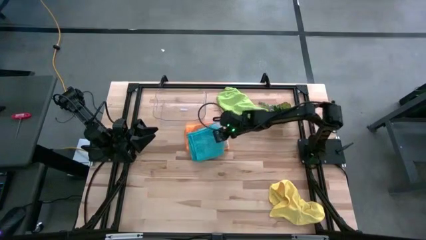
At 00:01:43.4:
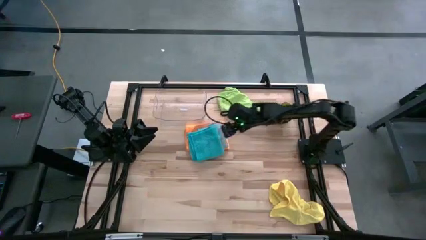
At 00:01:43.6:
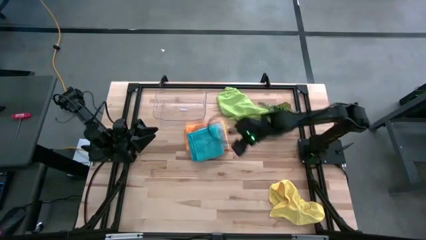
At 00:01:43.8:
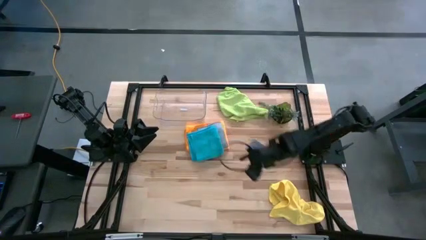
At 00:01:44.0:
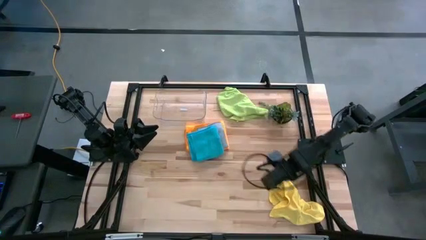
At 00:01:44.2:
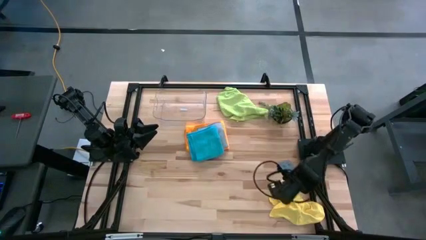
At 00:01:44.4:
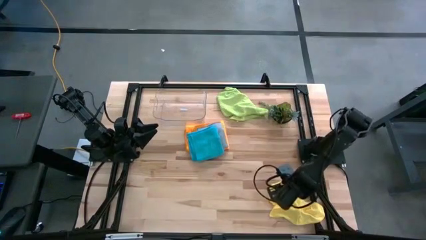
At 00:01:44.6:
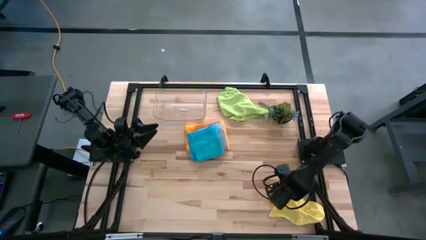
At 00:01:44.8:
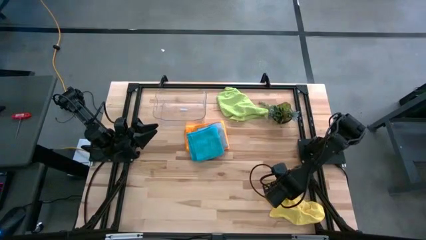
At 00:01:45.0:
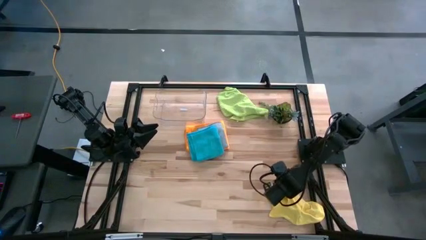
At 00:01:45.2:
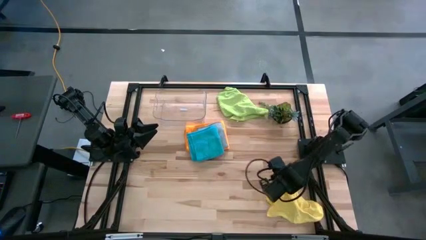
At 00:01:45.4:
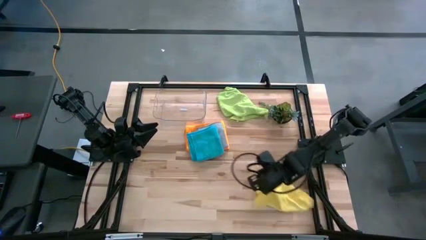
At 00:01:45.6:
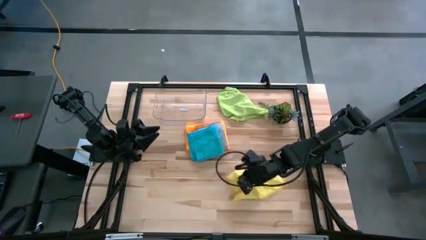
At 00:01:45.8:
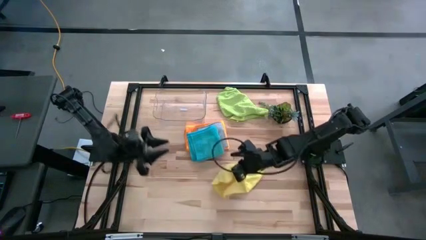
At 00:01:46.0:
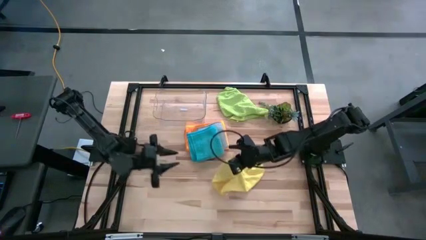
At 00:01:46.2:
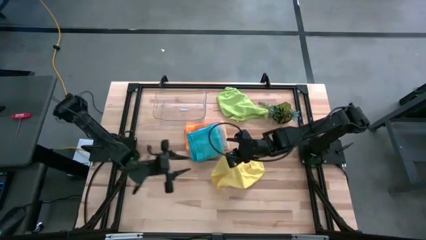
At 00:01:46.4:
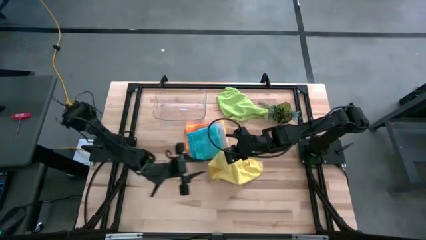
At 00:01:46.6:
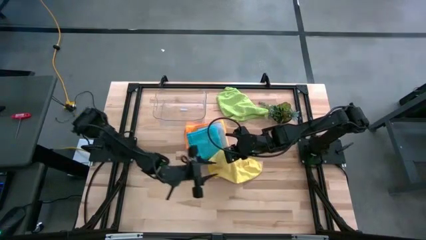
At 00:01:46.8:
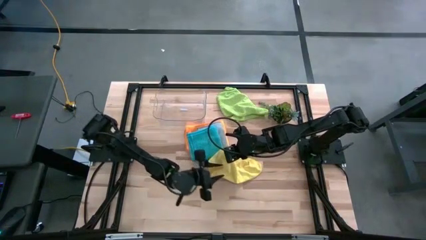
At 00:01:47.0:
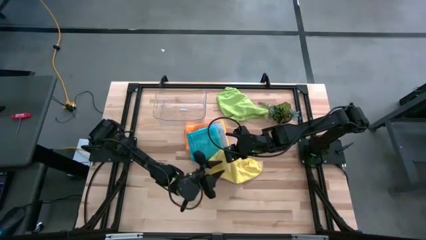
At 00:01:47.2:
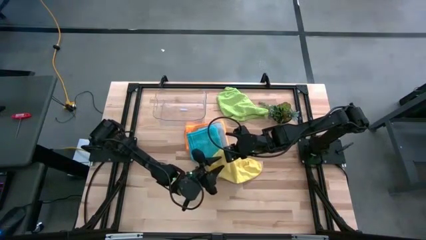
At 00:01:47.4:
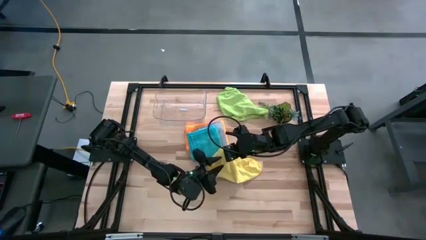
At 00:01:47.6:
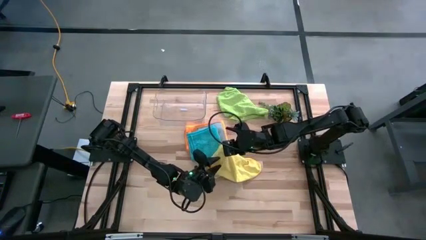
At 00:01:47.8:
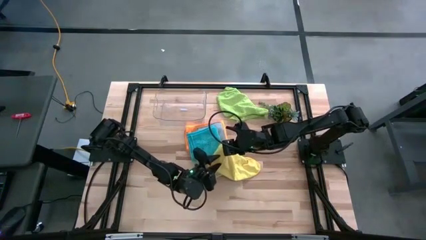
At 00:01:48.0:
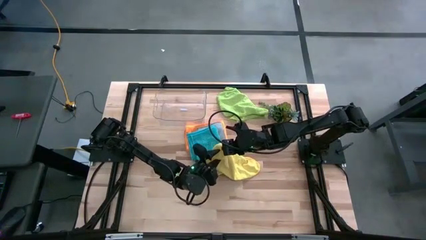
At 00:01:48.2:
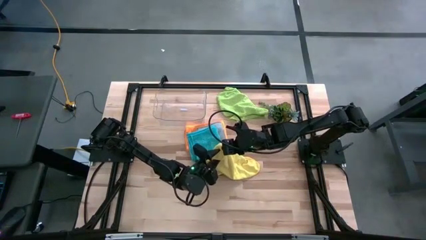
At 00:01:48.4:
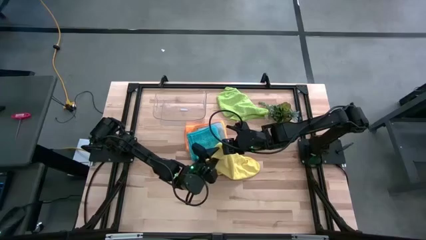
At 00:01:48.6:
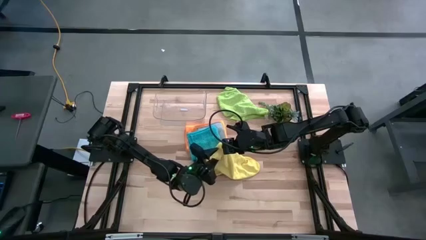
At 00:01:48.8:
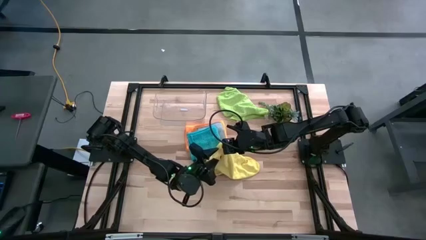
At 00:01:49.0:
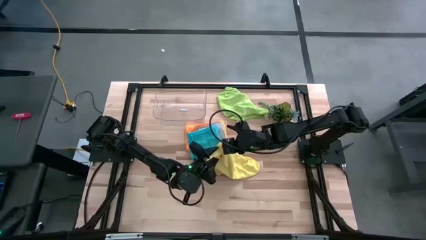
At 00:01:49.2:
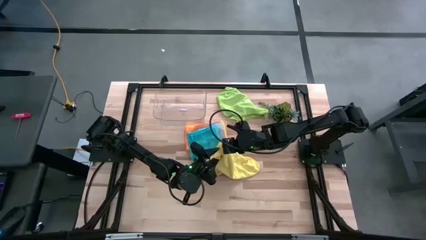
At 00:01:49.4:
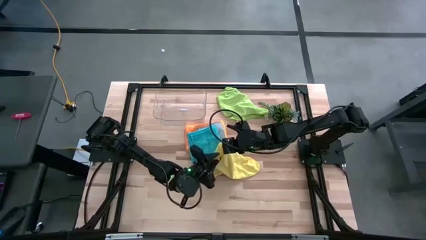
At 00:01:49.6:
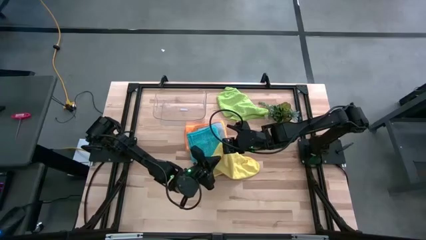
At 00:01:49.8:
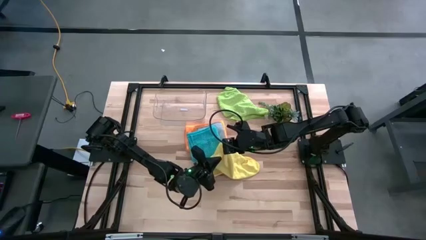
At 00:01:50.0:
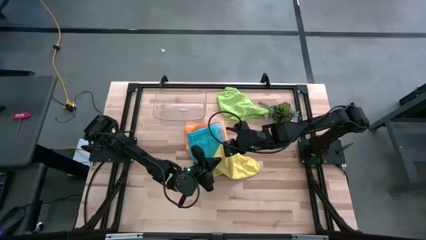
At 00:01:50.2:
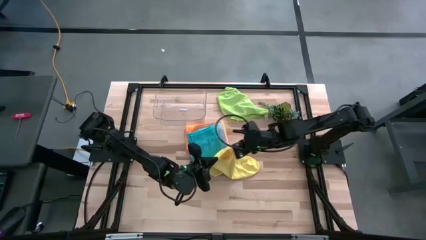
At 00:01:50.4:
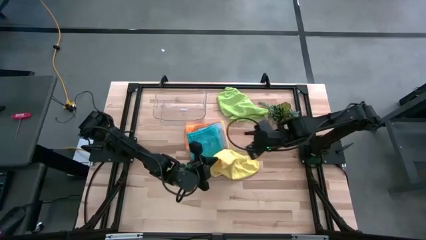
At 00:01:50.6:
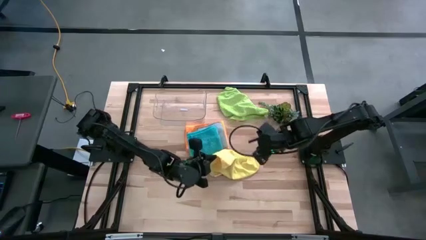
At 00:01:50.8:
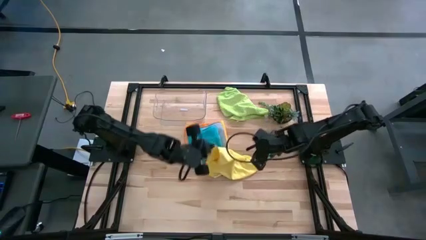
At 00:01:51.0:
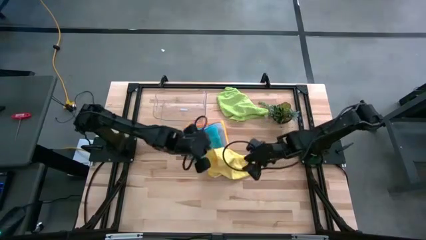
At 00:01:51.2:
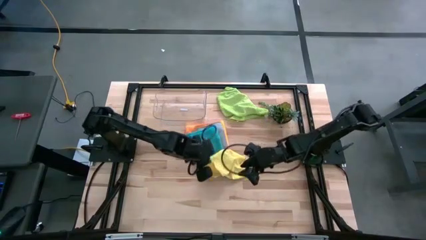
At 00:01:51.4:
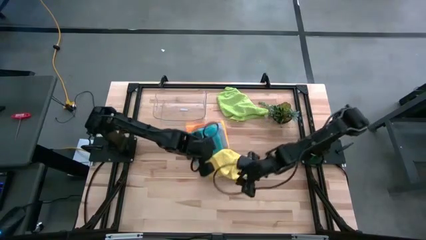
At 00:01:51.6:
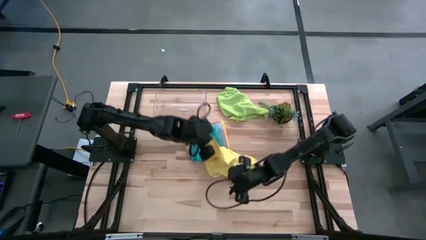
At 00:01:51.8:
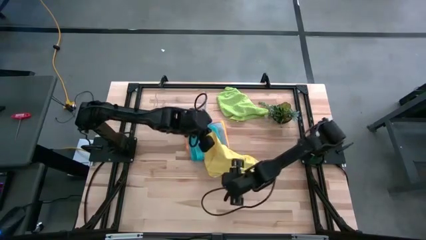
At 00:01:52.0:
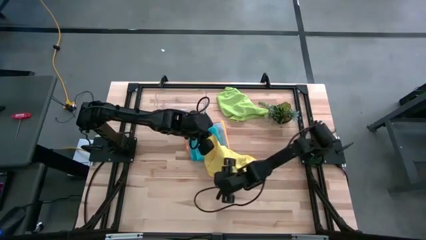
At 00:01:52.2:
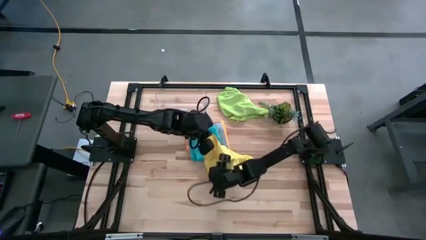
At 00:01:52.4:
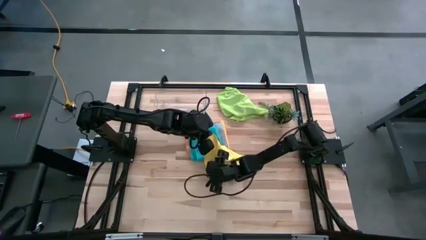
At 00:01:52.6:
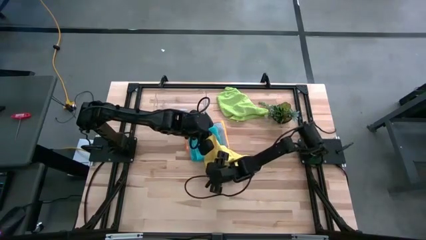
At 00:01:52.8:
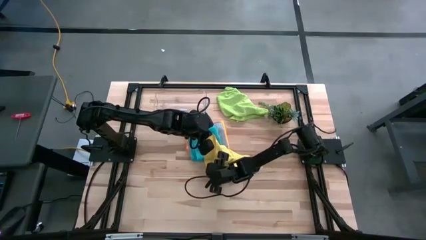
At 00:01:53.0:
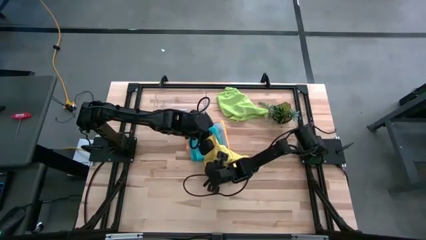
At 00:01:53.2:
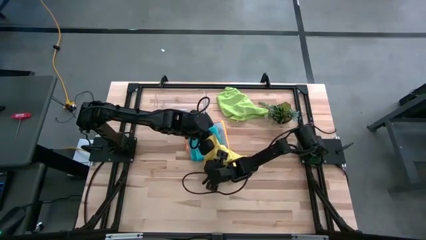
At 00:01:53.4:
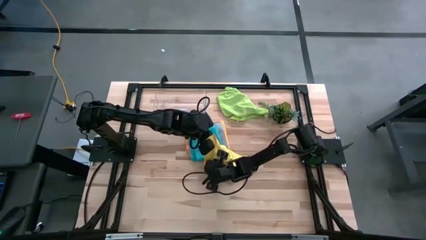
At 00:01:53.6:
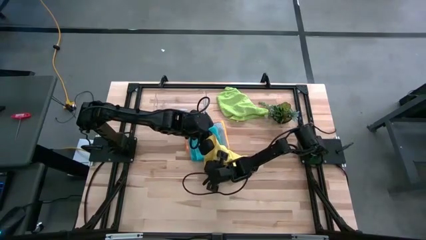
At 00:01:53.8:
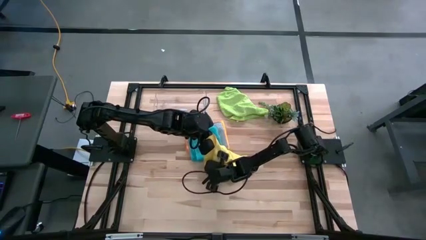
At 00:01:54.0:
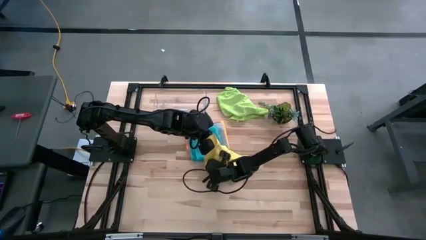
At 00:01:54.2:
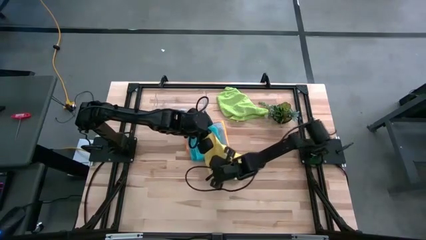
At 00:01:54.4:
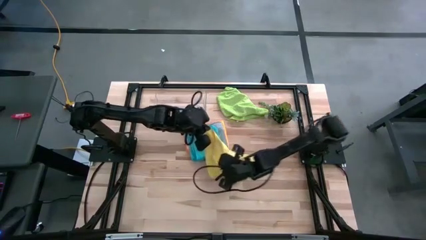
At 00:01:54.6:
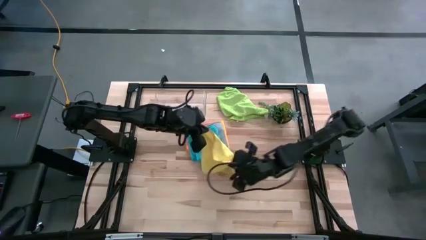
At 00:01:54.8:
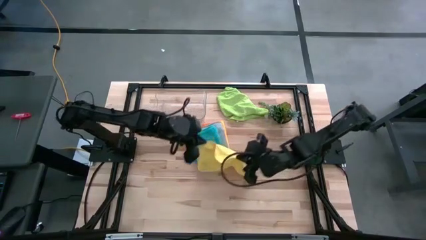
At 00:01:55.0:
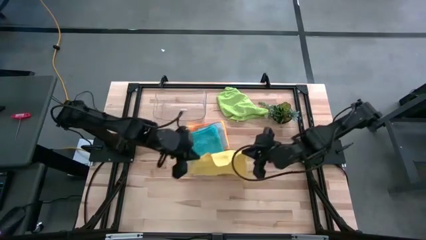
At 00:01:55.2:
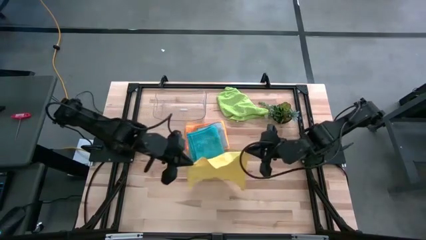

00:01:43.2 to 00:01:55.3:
Task: Fold microfiber towels
Fold the yellow towel
